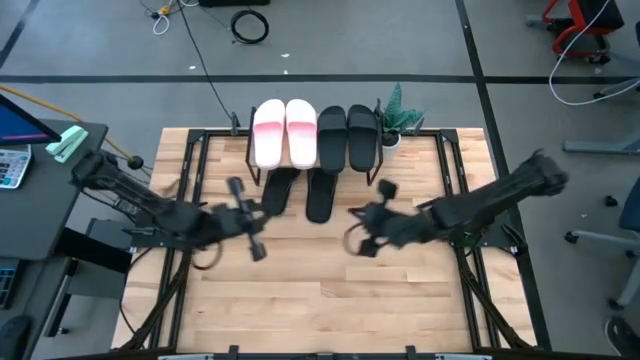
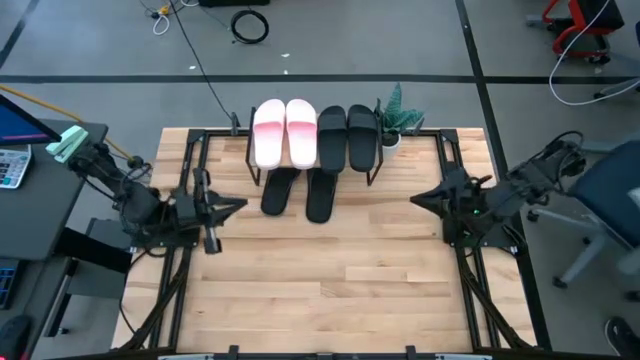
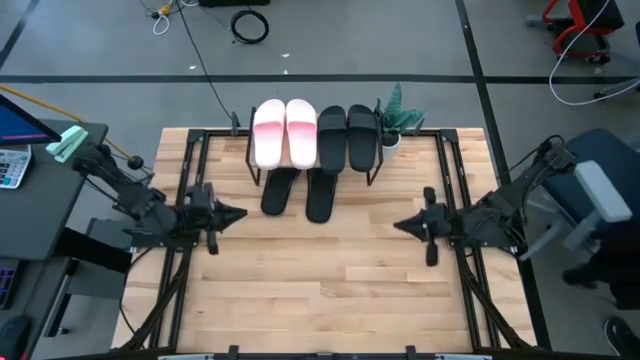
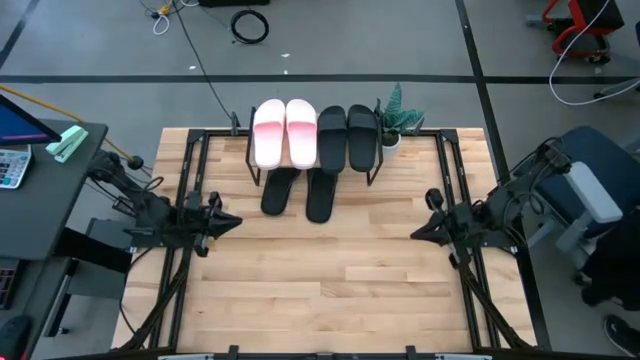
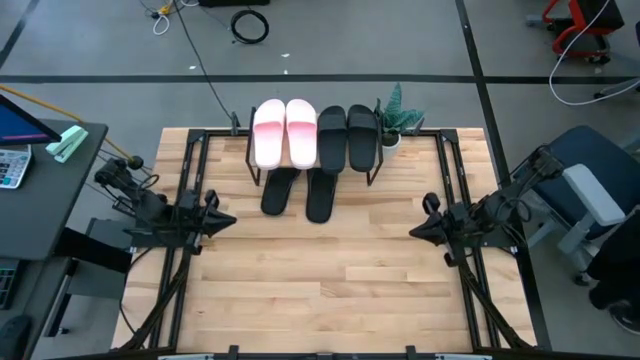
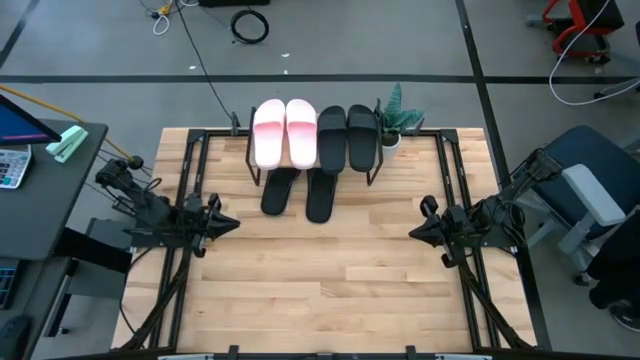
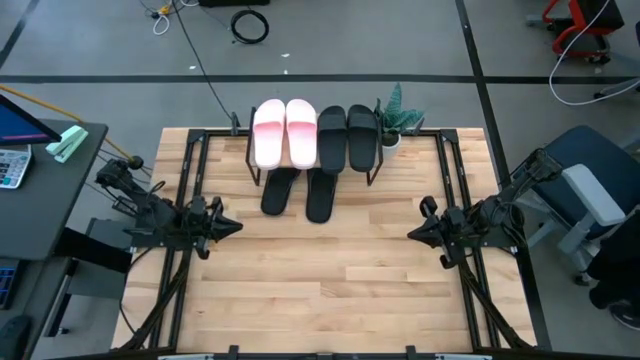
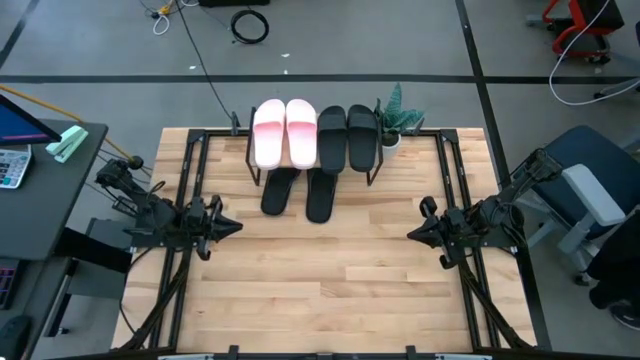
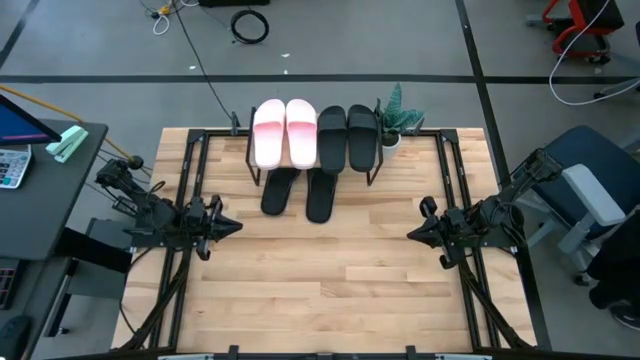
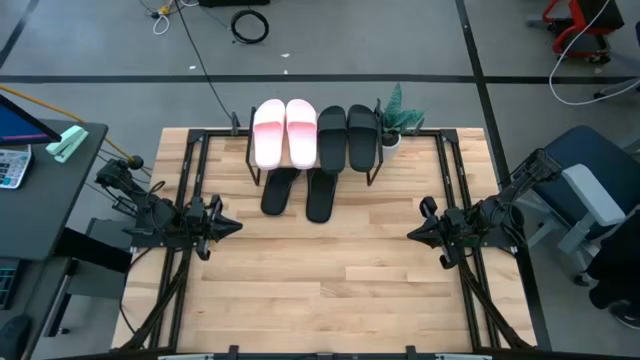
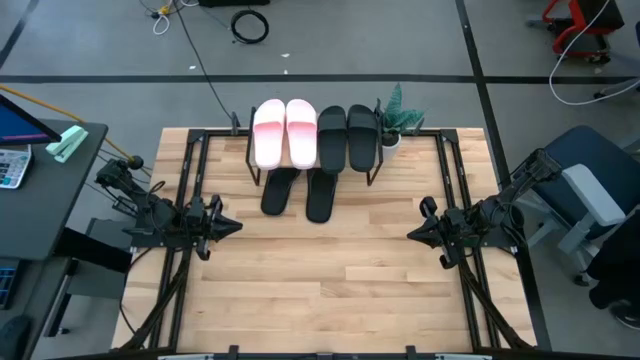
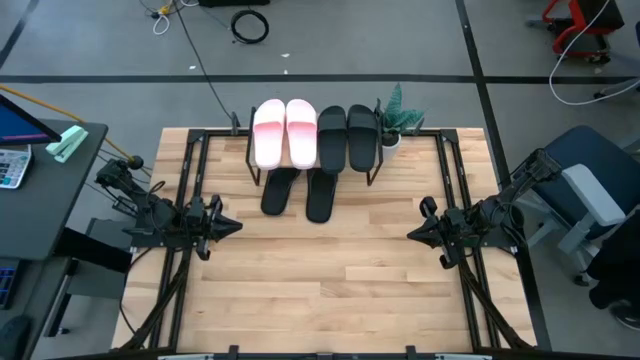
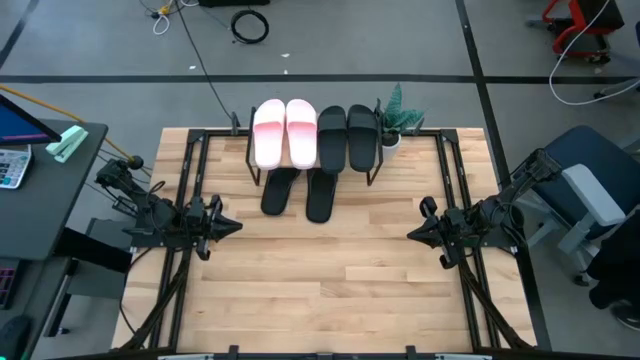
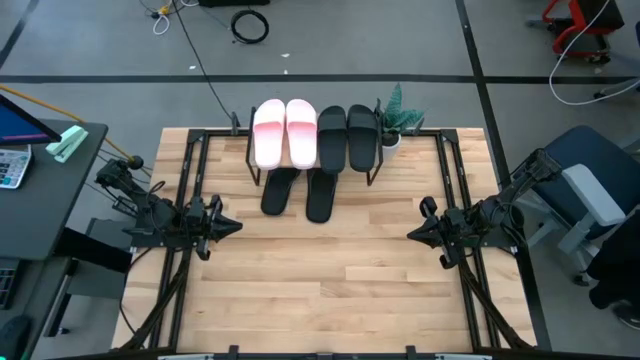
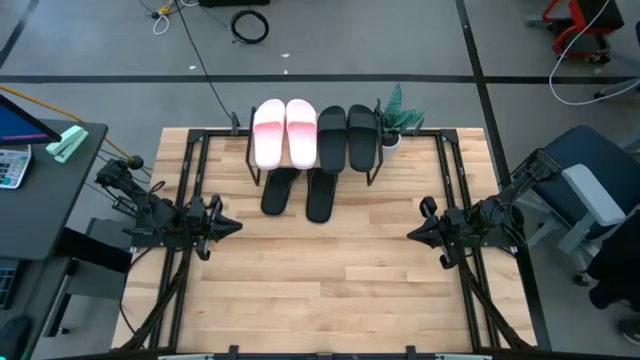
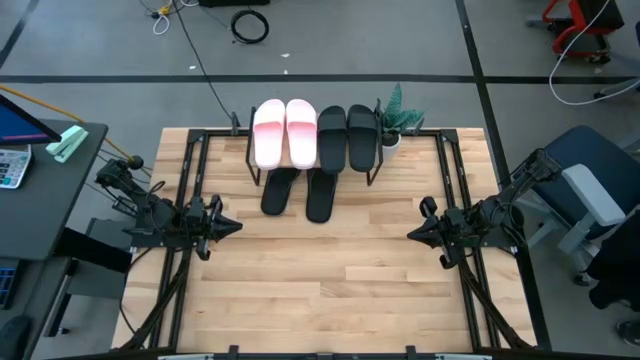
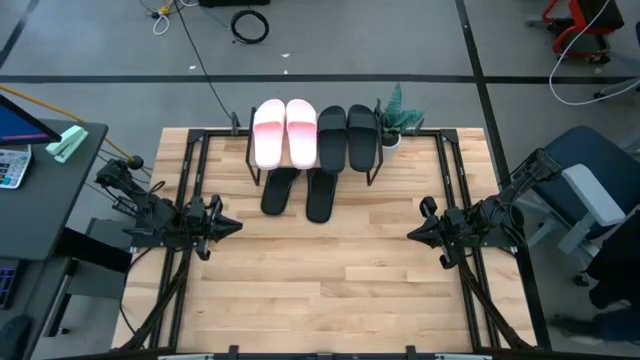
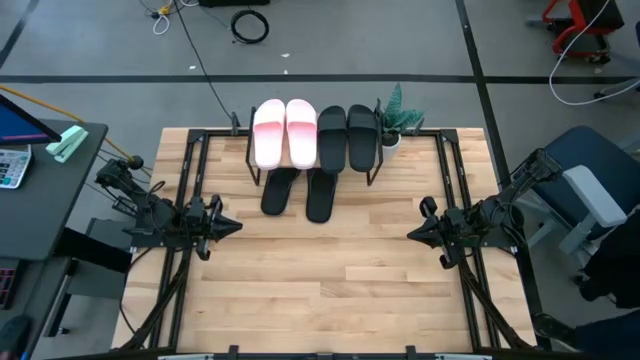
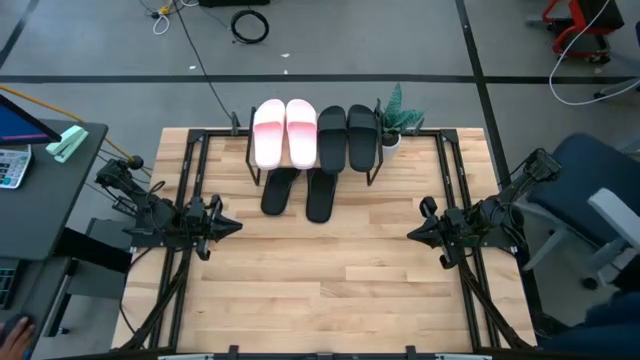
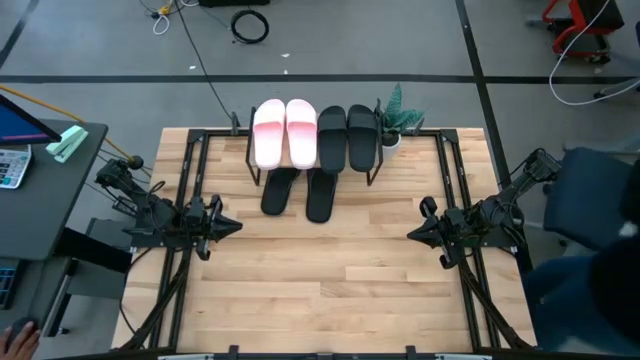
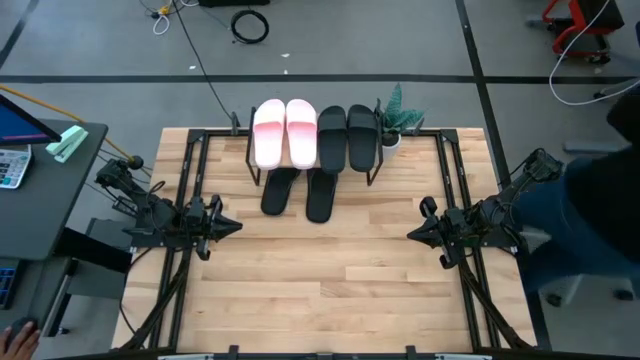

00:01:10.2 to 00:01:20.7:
Task: Pick and place slides into the shelf
Return to Home Position

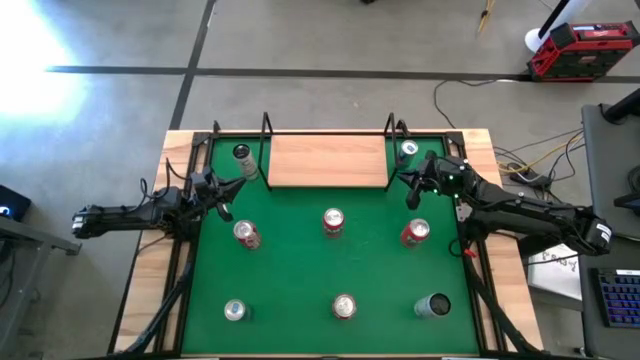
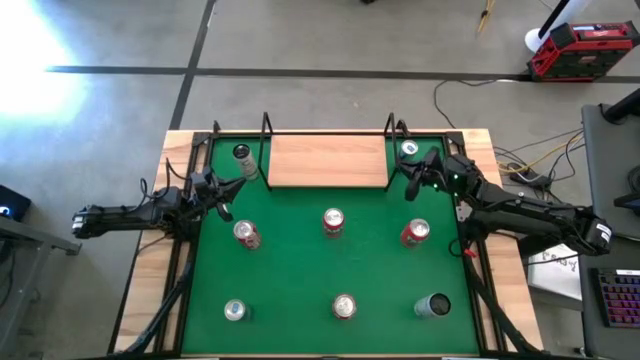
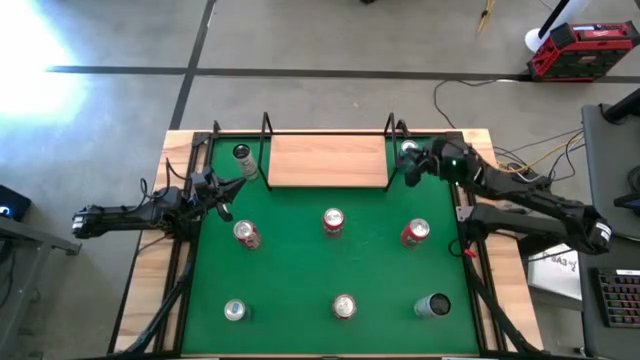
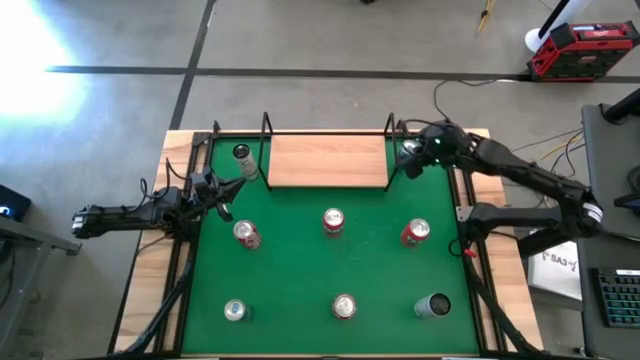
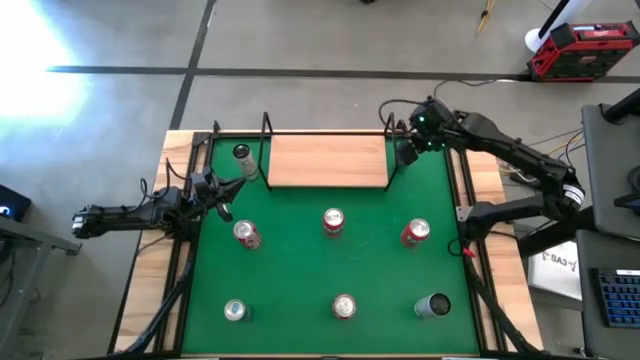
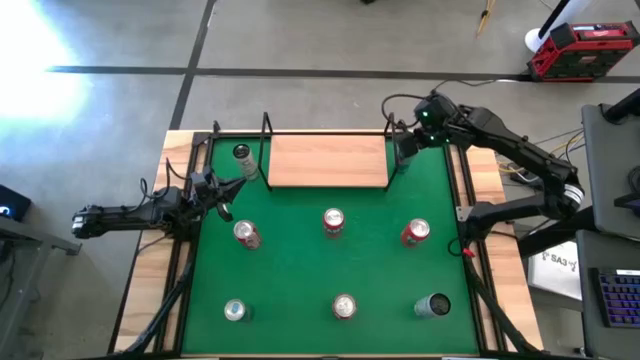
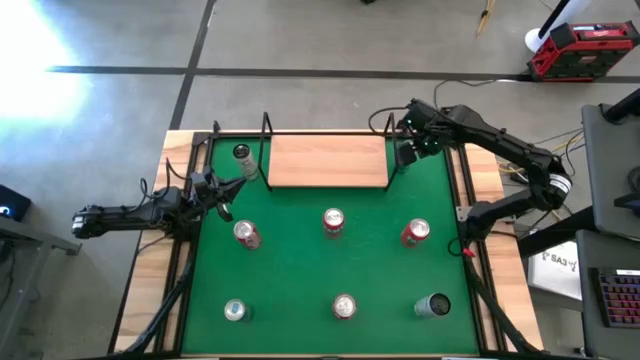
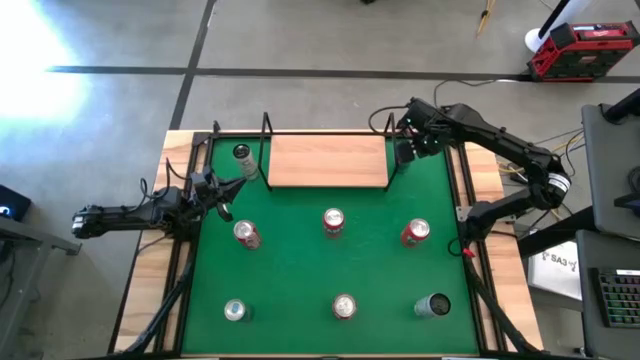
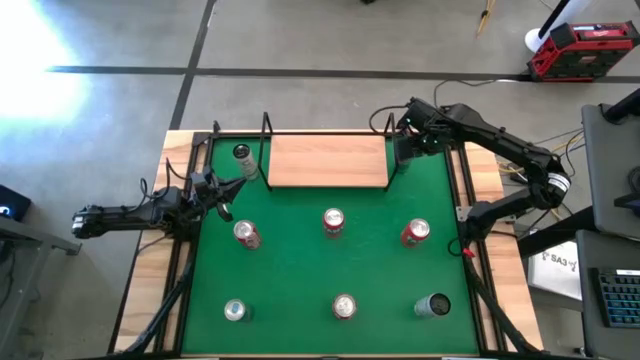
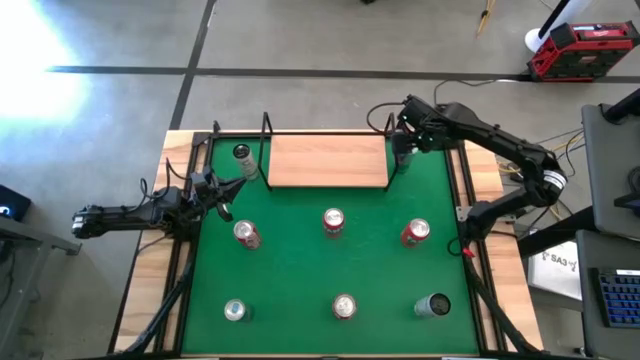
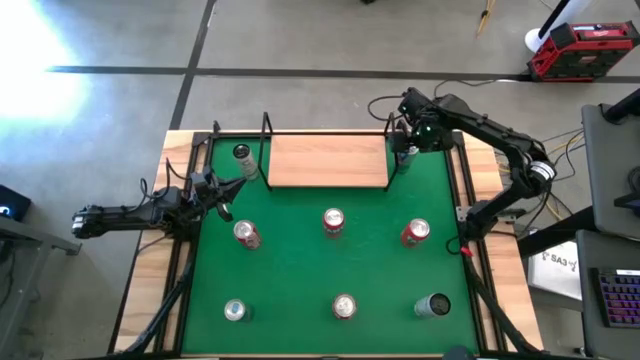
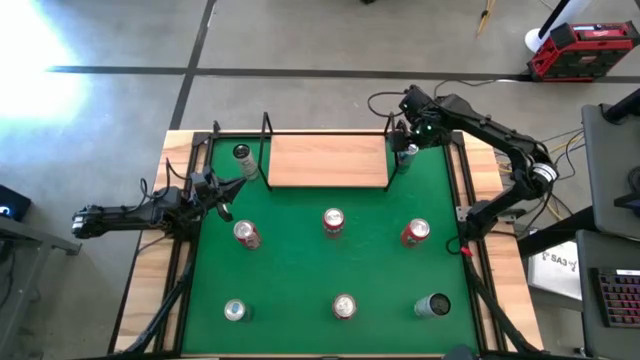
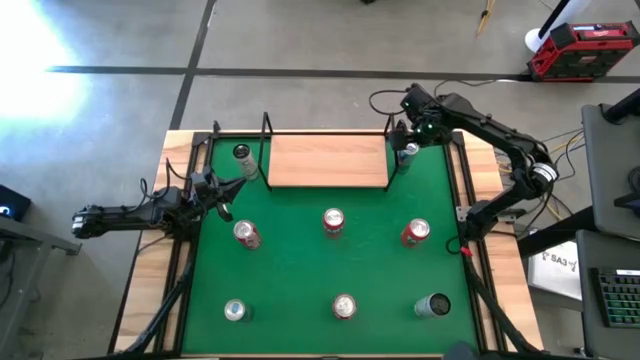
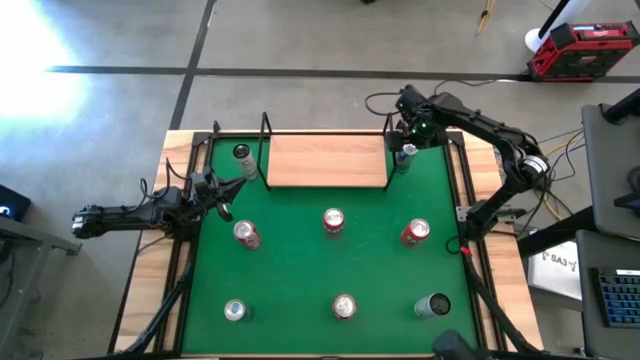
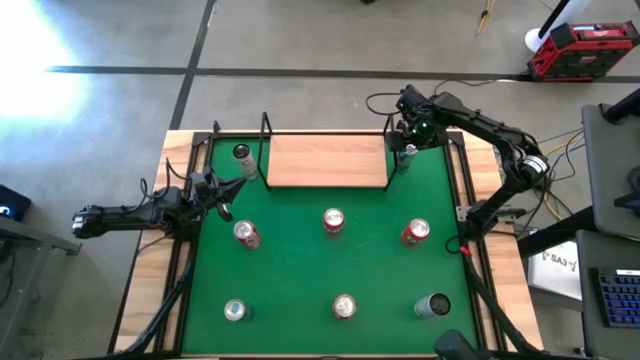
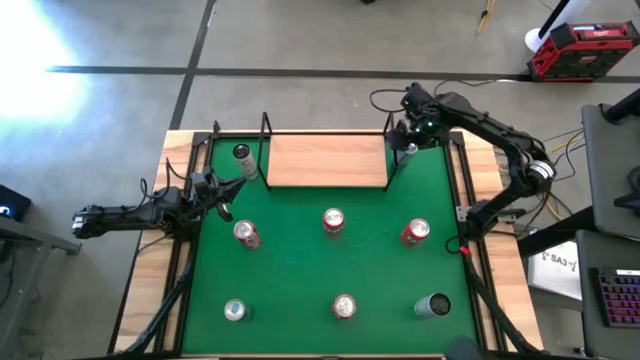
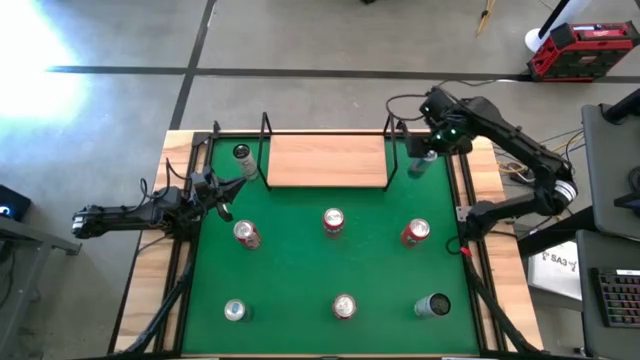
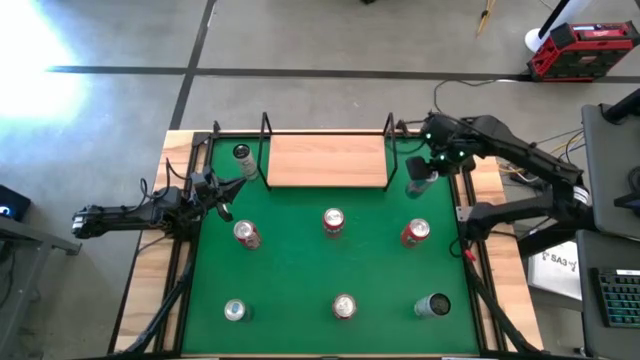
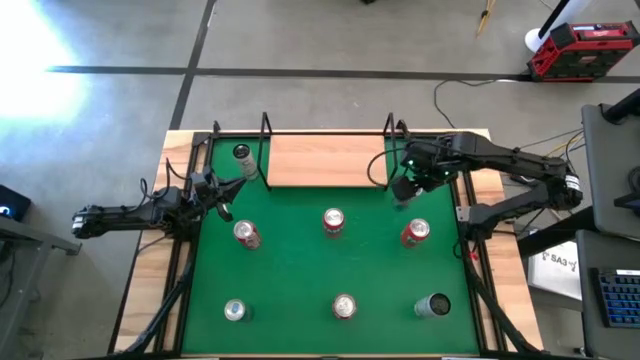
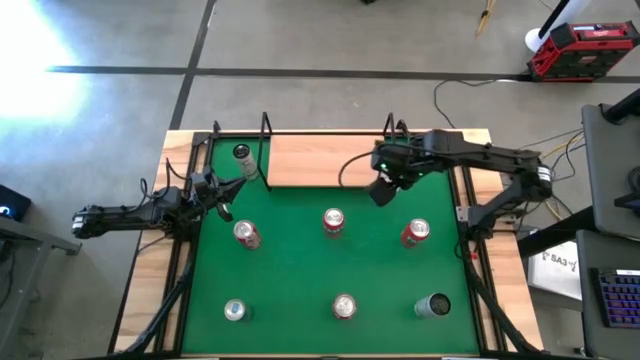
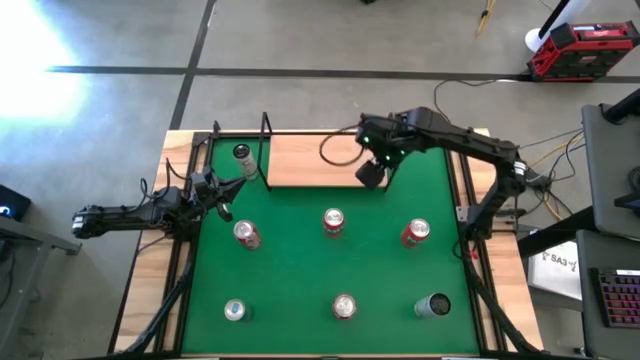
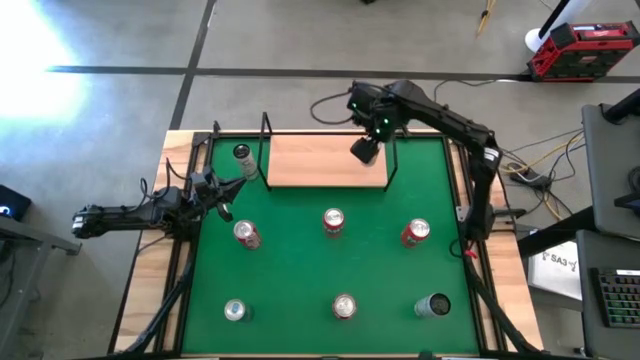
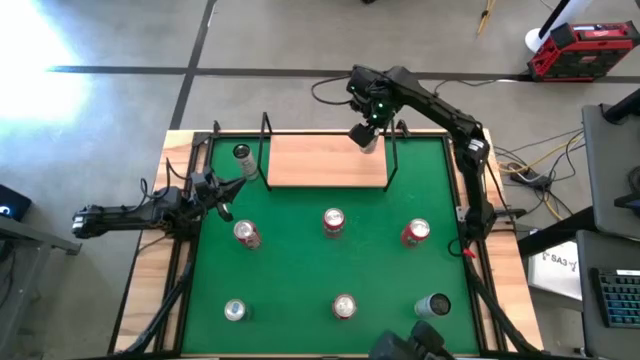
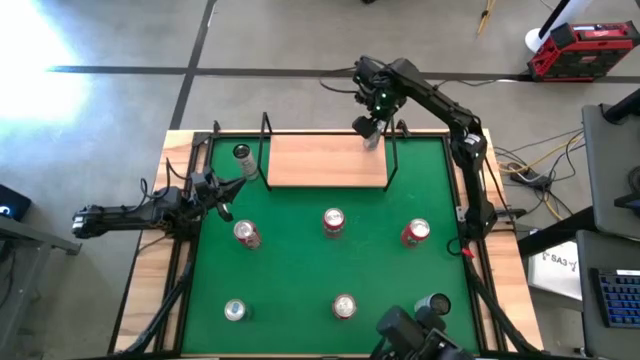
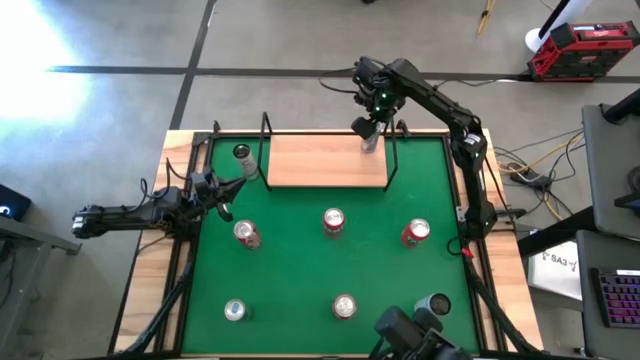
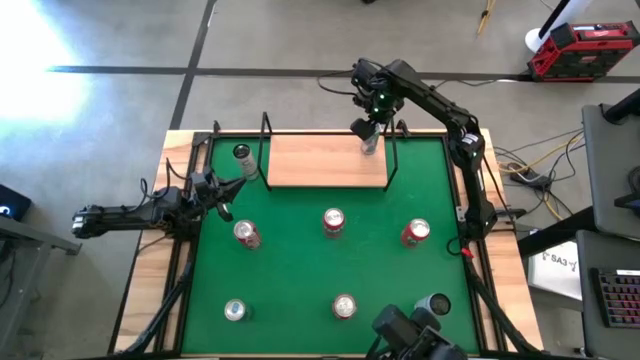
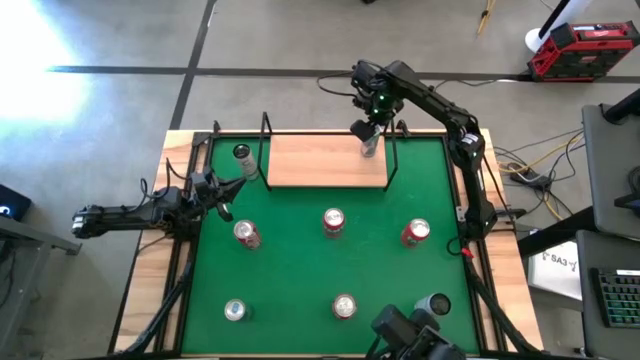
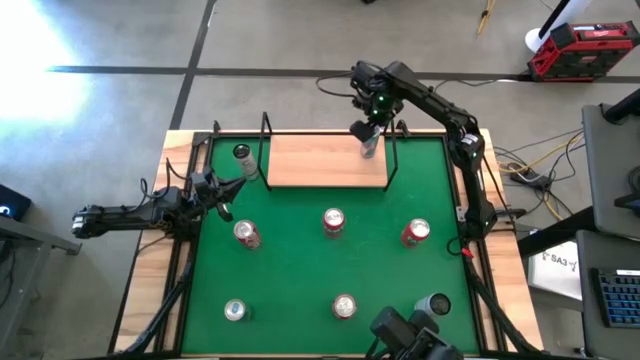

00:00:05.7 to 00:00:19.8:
Task: Place canned beverage on shelf
Put the top blue soda can onto the shelf
